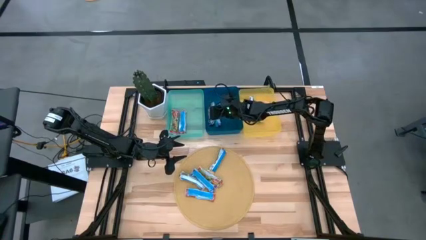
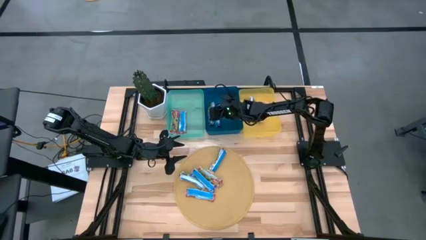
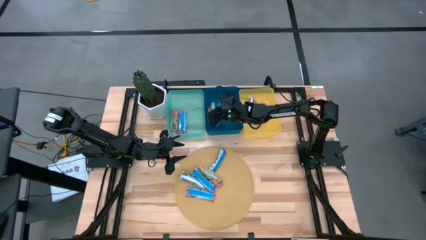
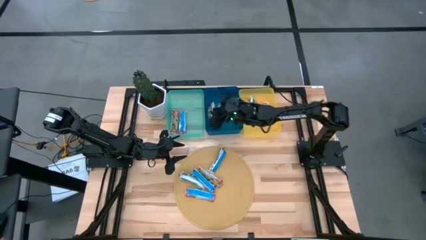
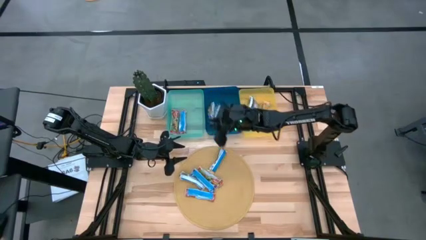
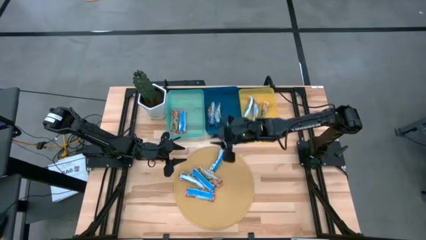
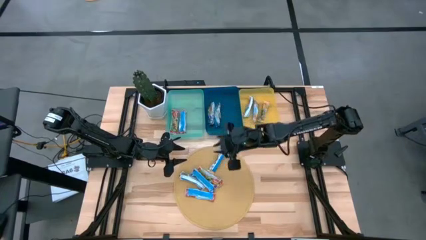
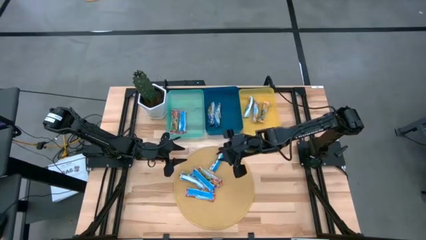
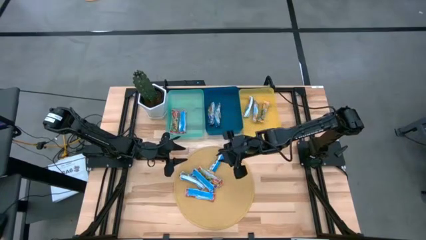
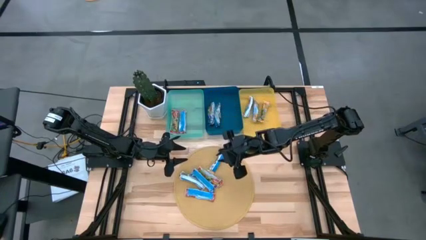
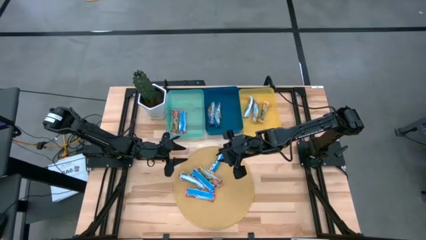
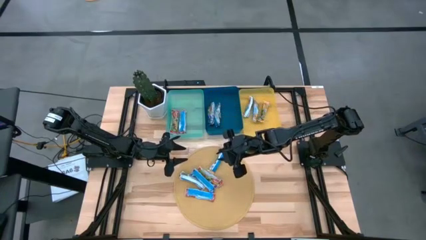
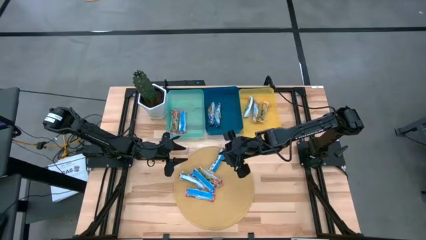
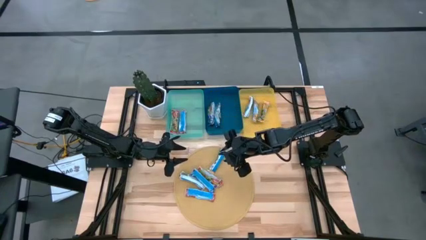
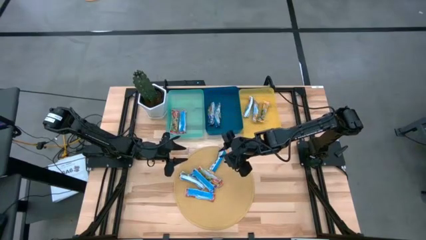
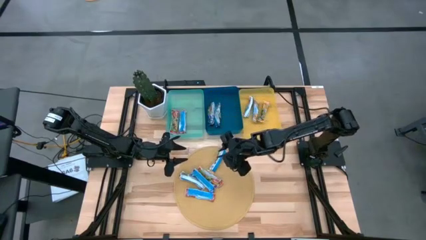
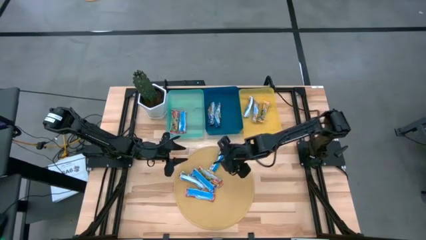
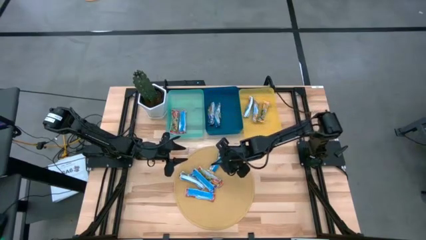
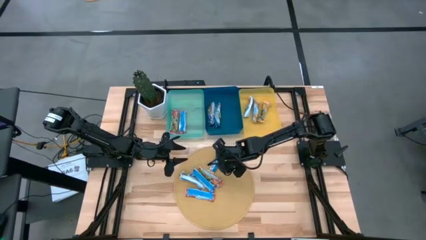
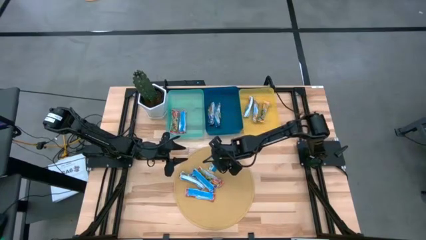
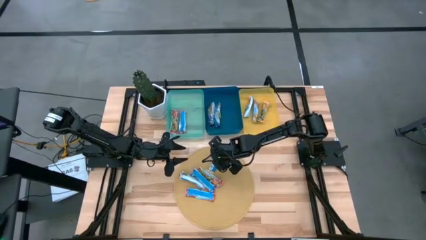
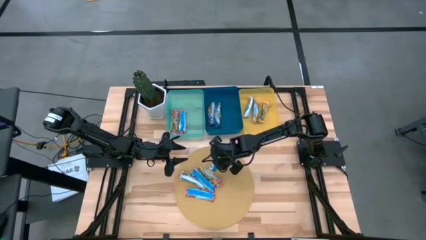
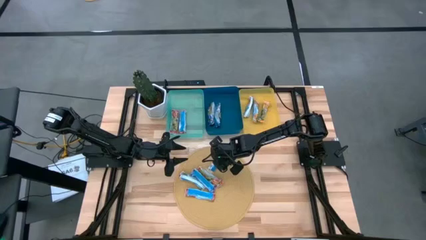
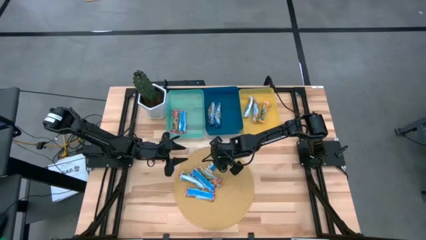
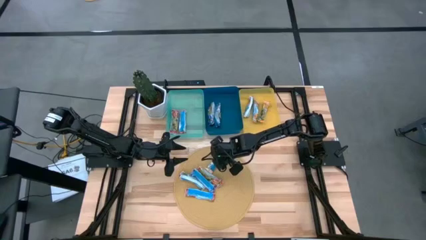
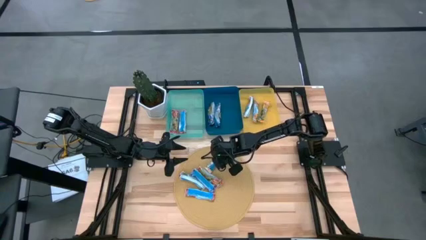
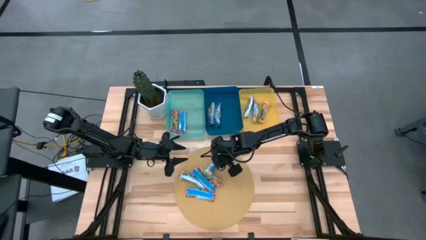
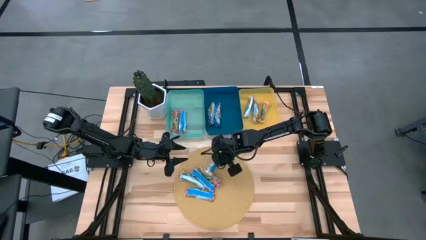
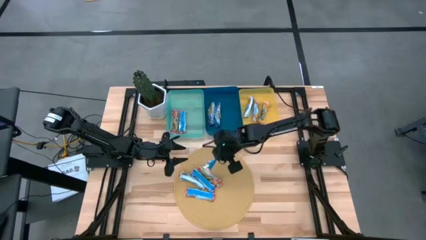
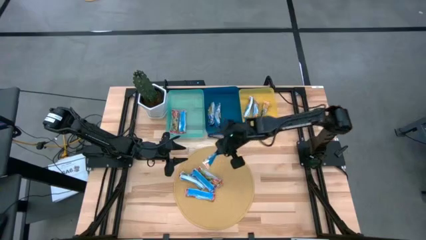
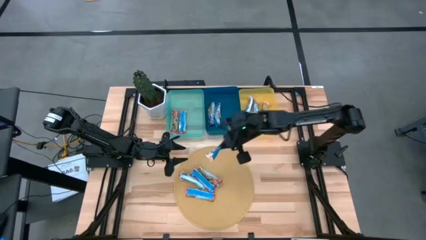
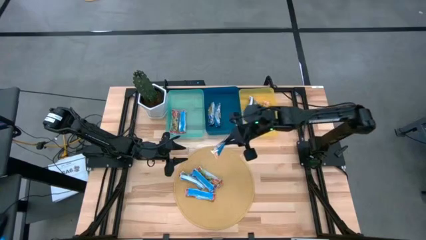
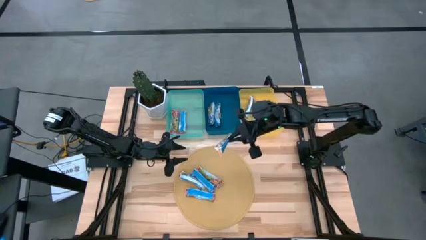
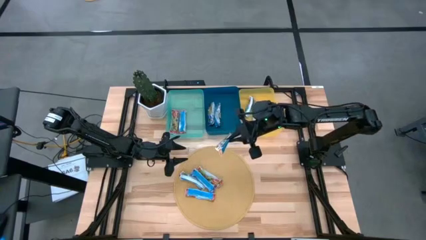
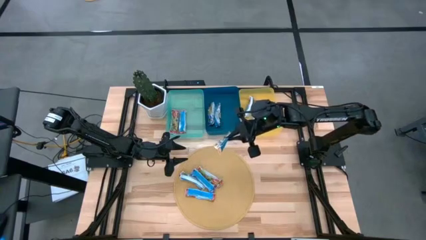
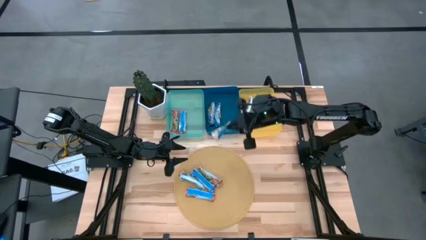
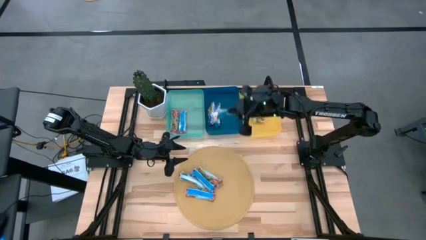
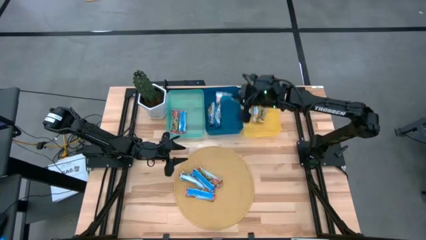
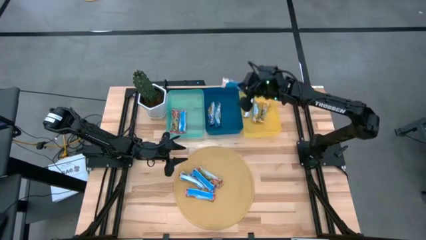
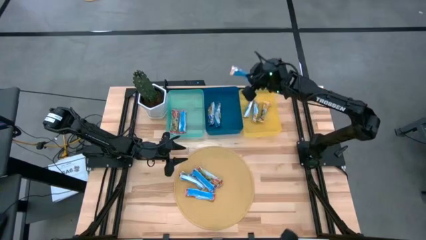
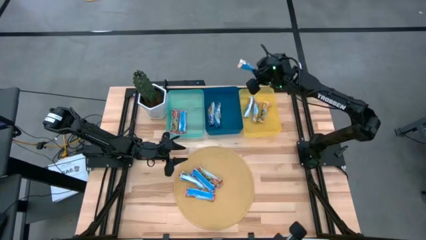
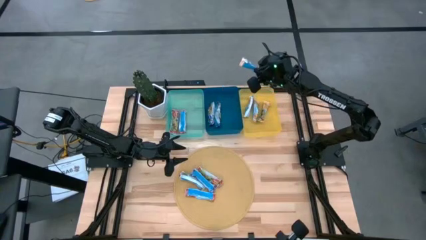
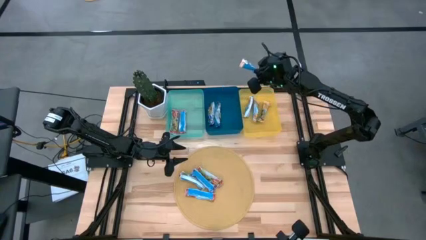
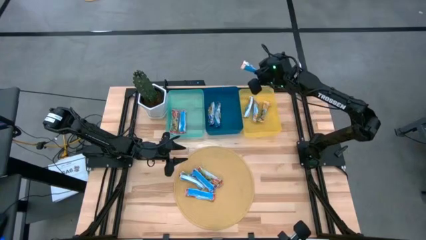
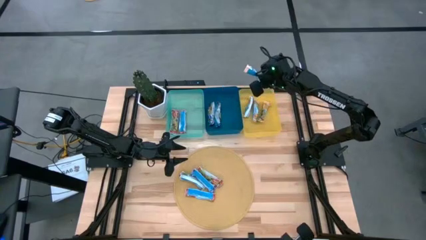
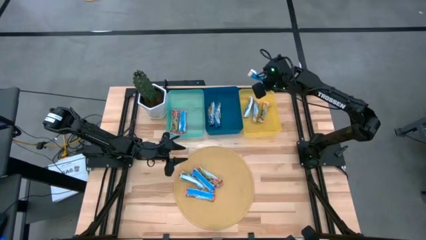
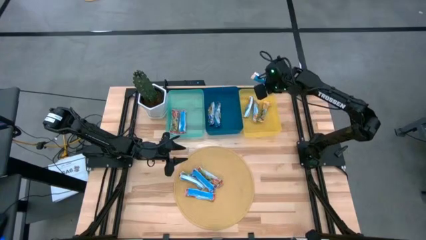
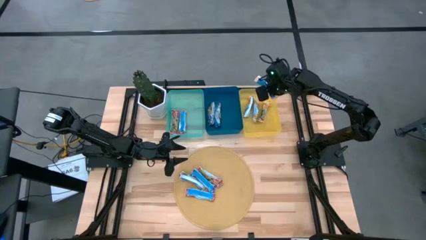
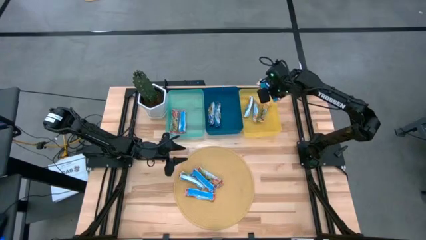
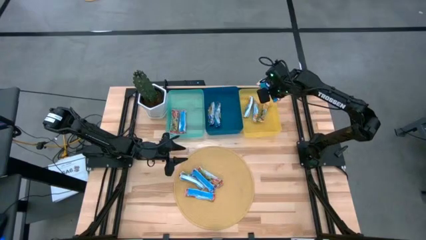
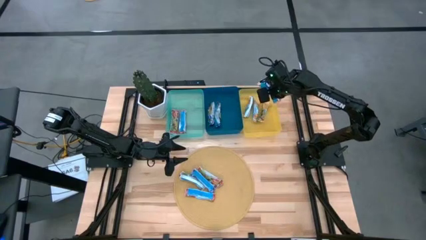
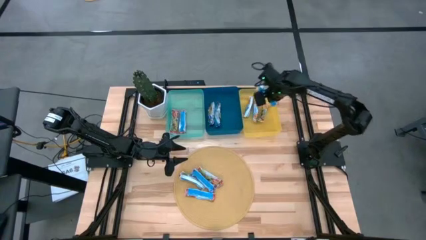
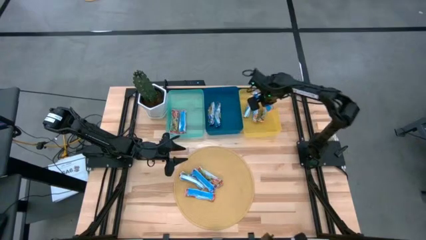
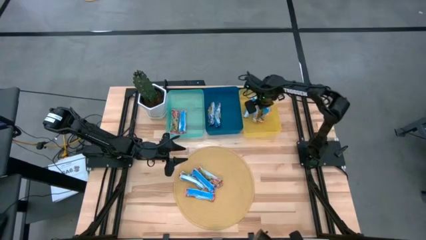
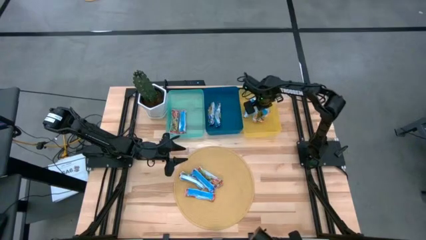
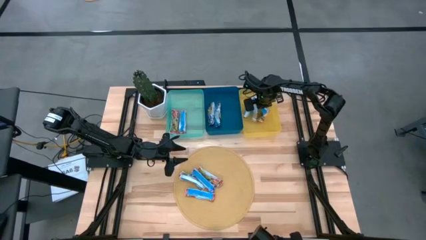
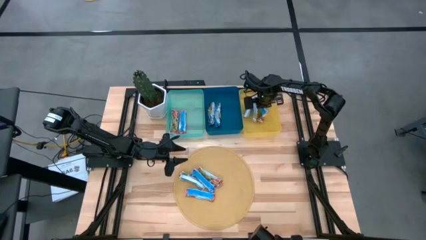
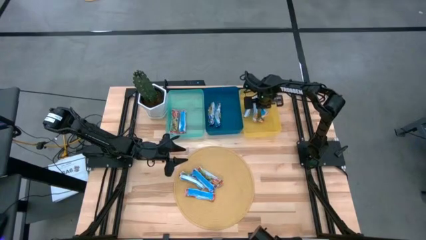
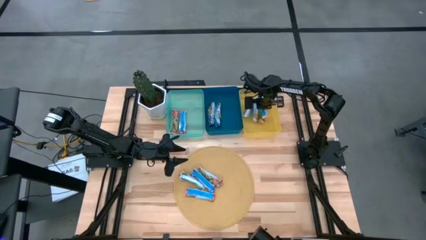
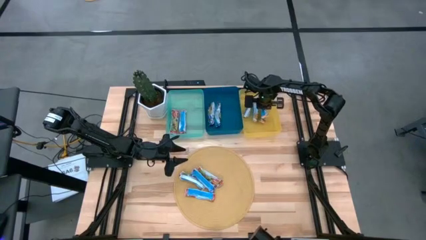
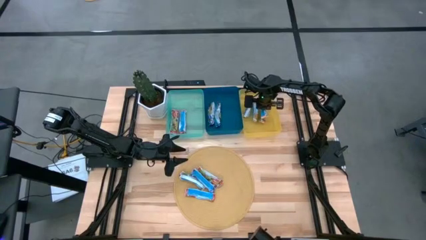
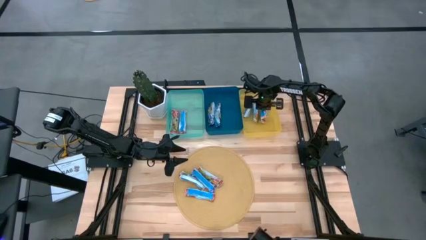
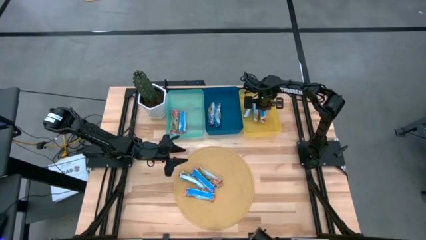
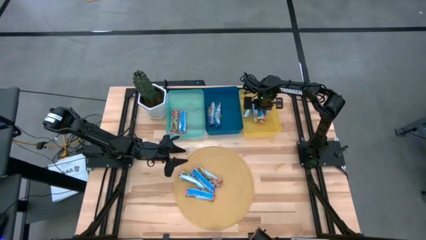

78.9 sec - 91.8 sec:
Task: Pick and place Granola Bars by type
Put the yellow granola bar into the yellow bin

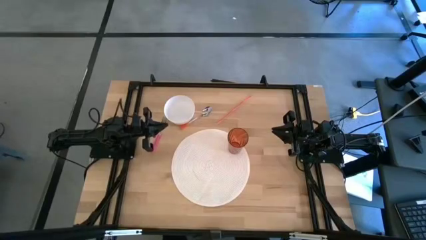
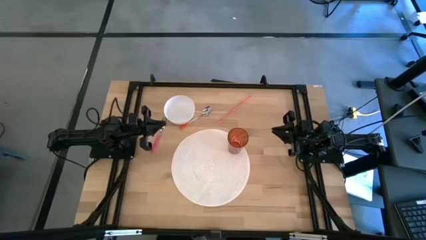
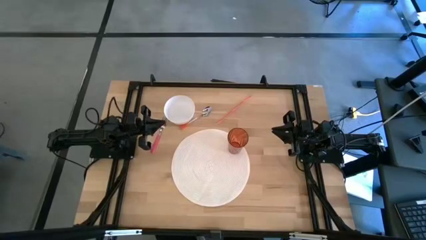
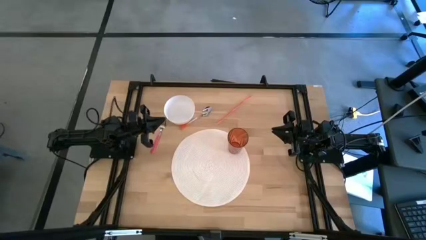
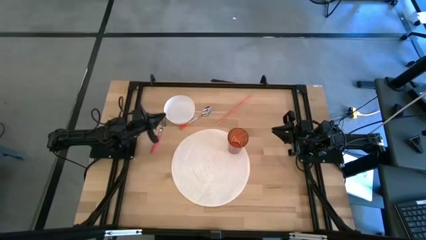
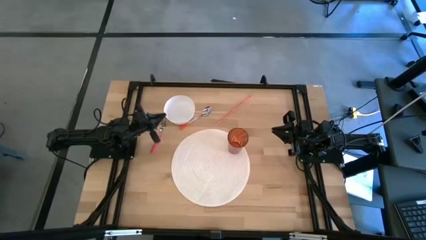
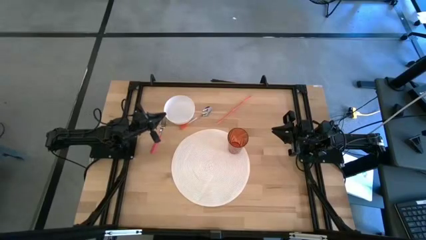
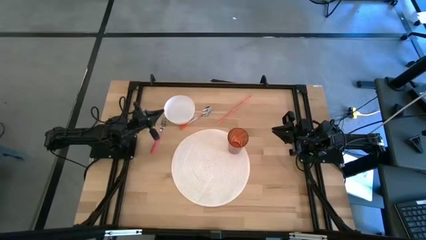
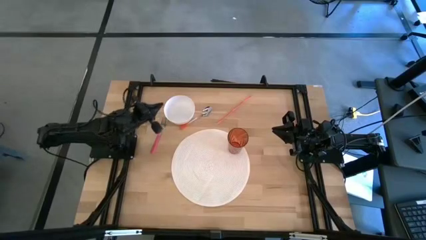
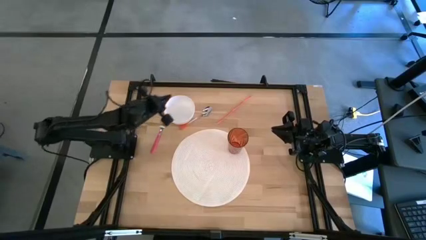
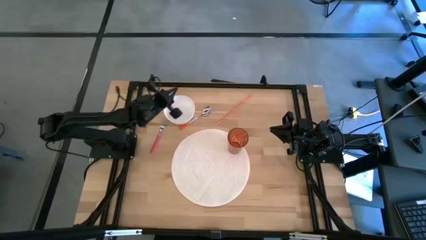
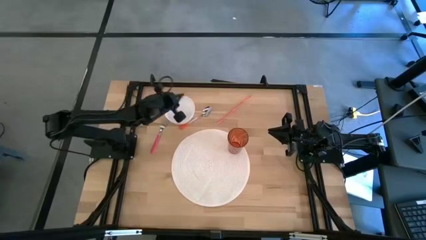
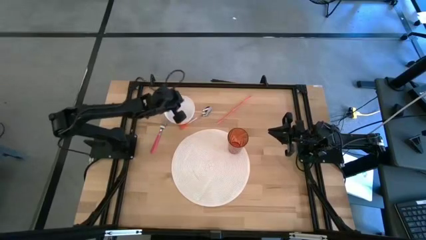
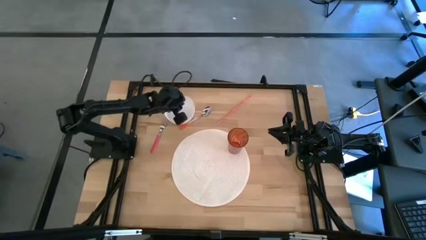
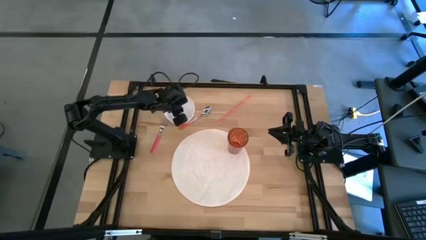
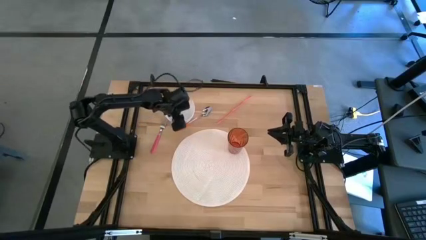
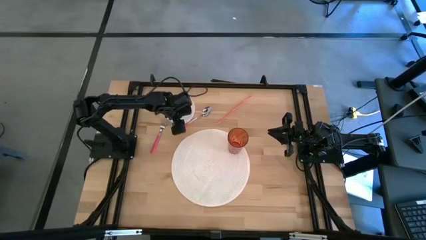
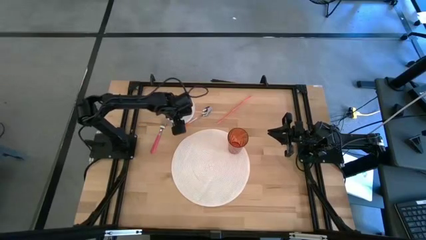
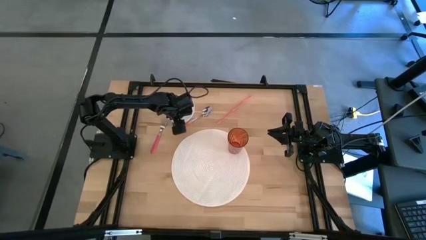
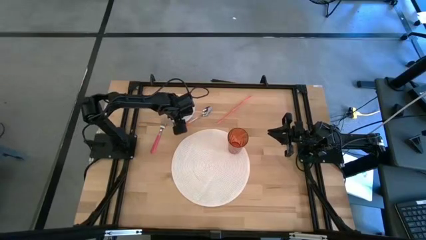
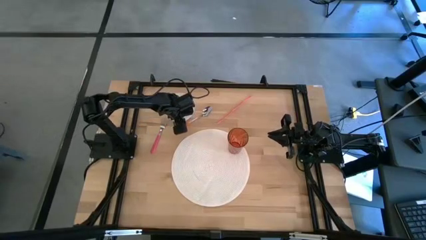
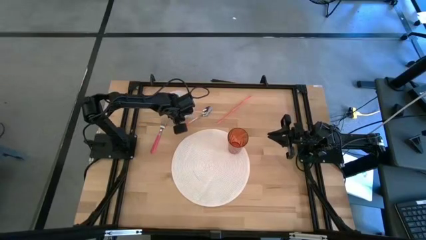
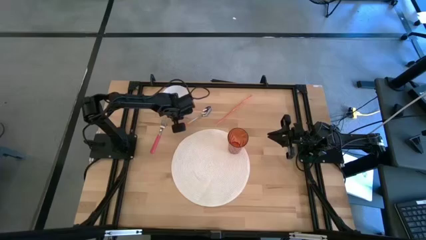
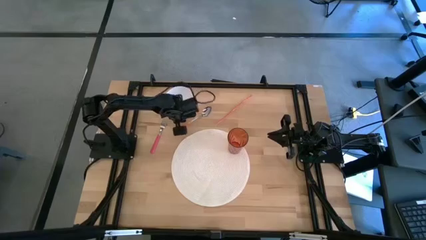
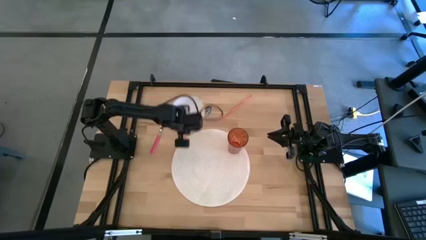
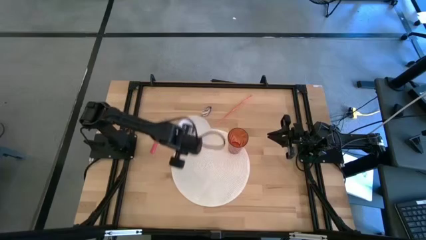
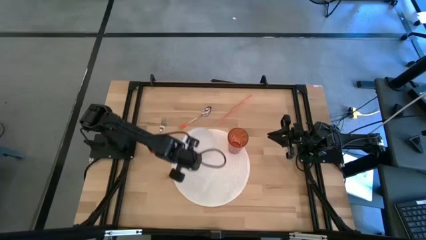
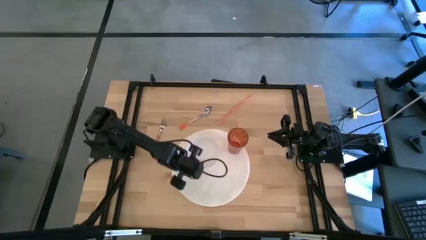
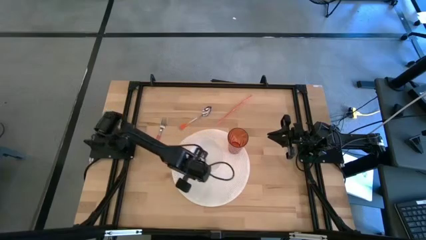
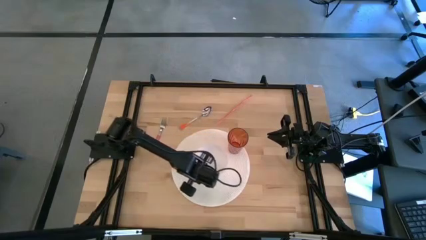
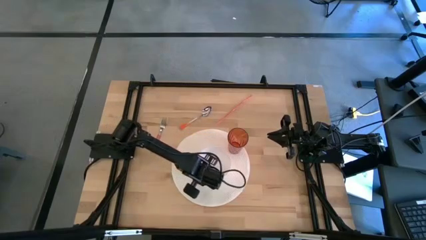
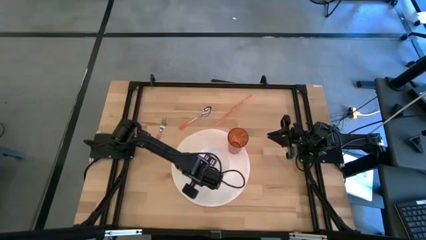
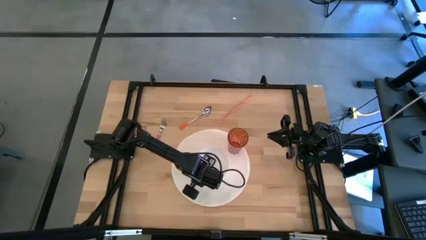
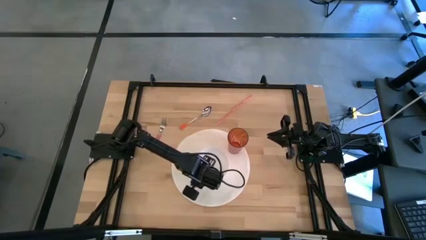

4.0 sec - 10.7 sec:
Task: Pick & Place Utensil
Put the white bowl on the white mat to the bottom left of the cup
